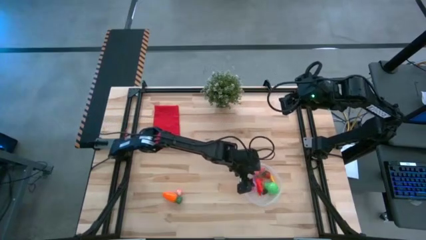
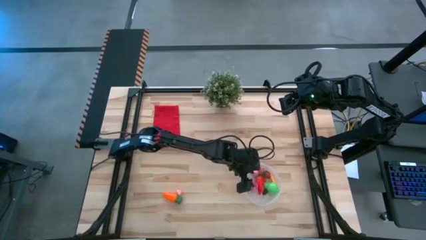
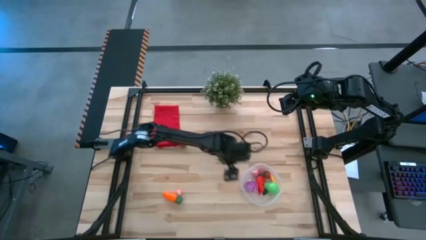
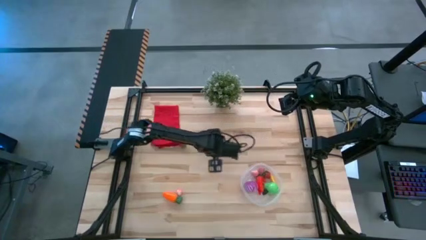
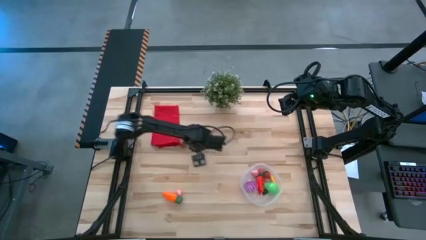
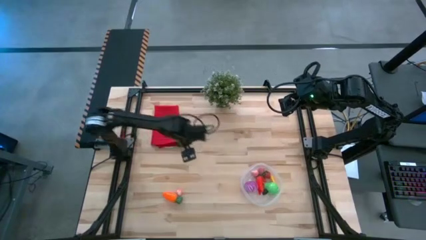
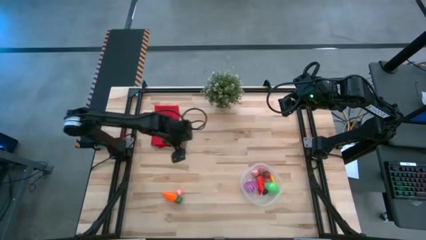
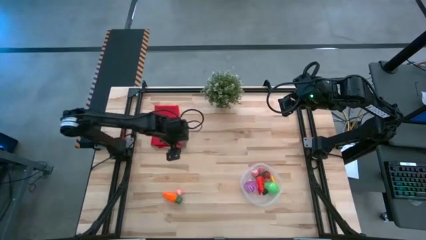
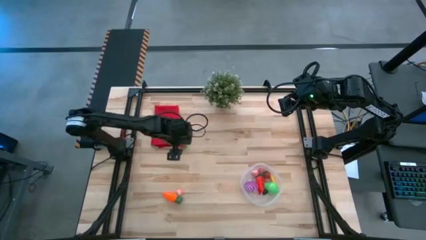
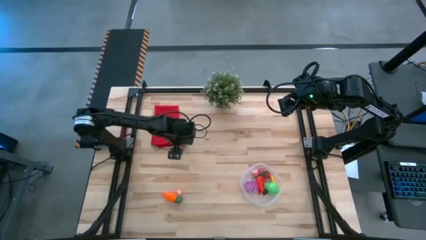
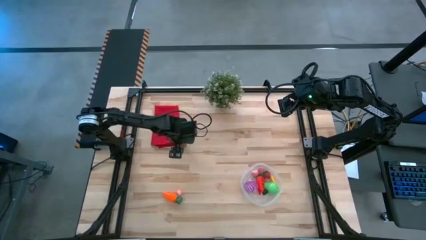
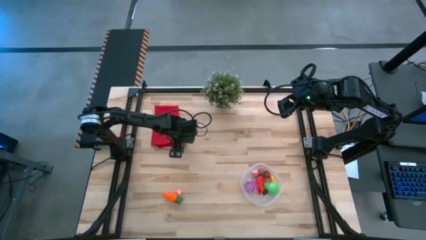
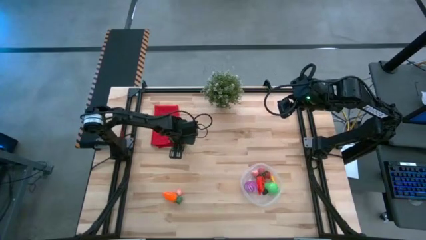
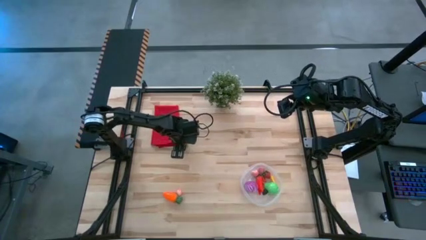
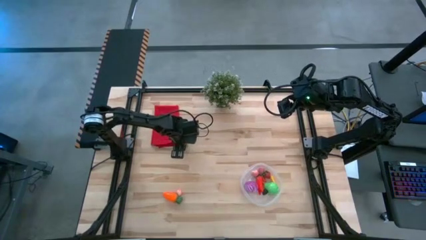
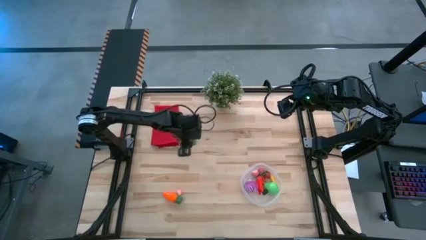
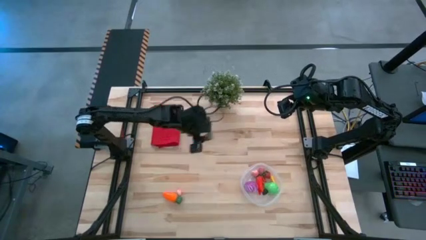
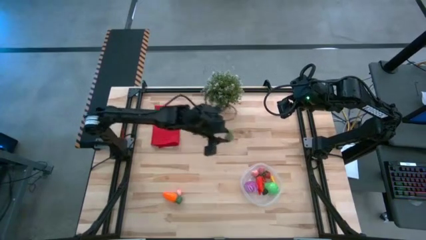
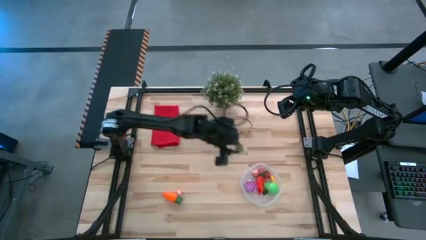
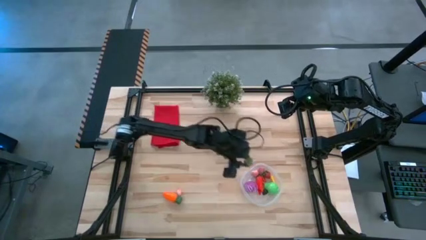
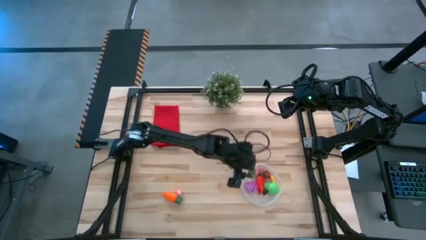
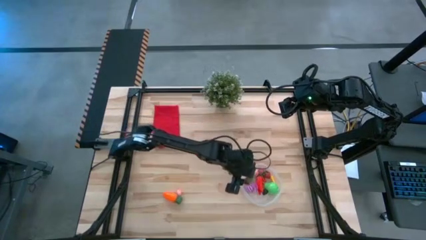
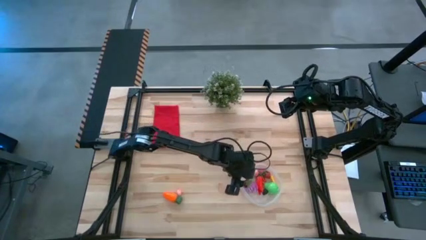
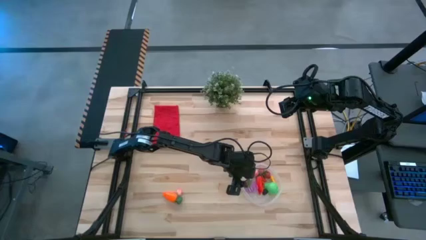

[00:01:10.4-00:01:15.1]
Task: Pick and placing Produce into tupperware
Put the red strawberry into the transparent bin

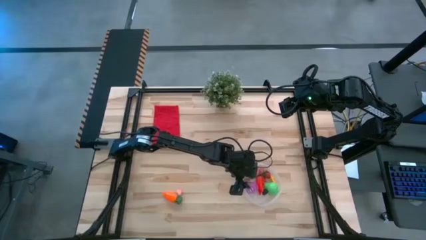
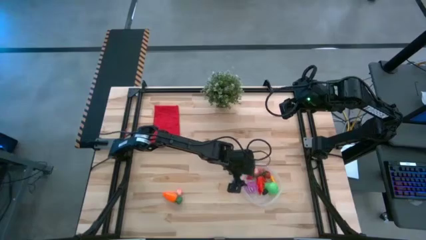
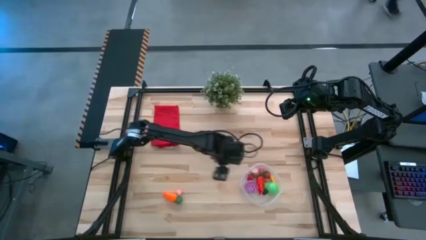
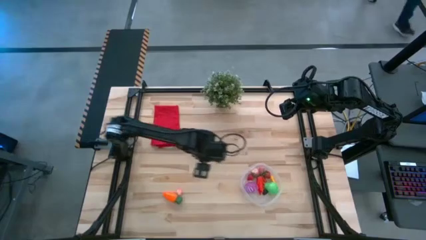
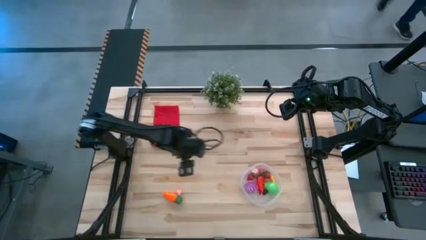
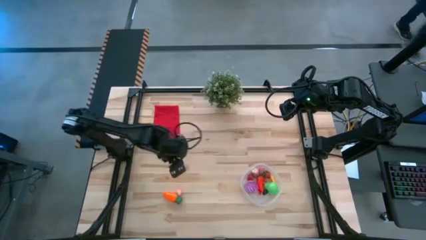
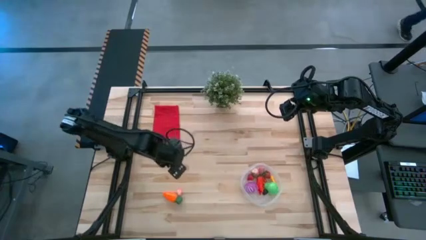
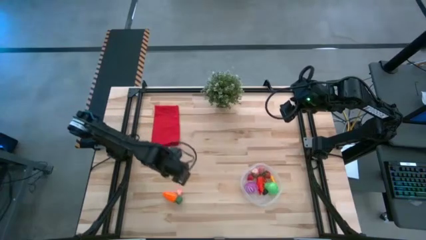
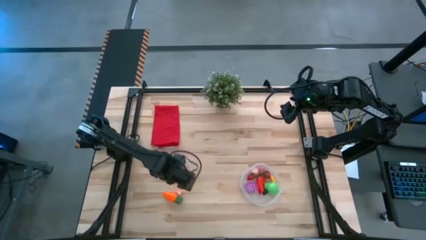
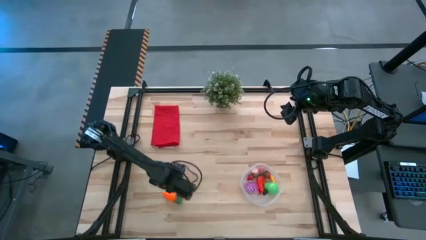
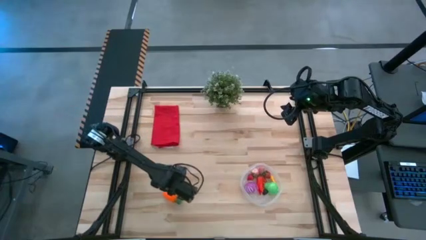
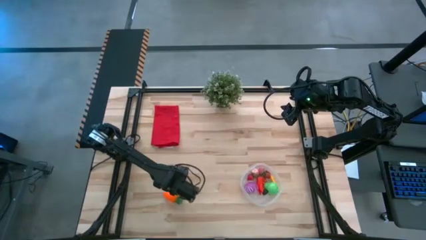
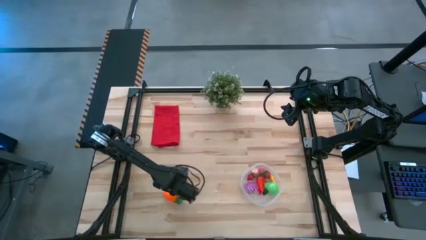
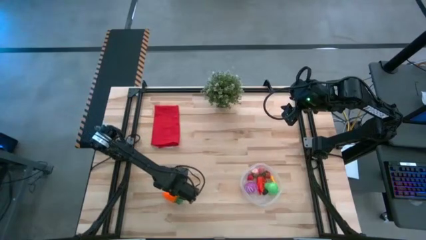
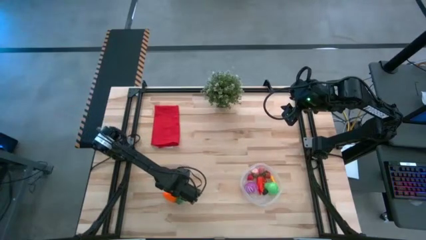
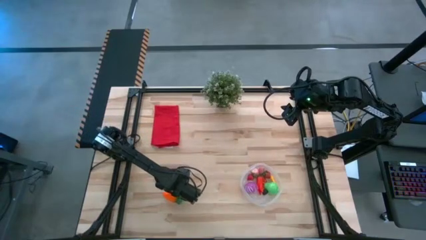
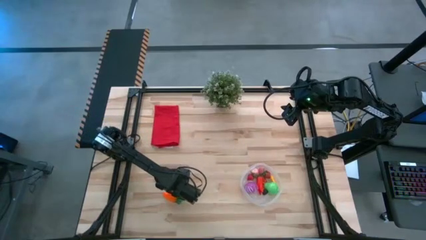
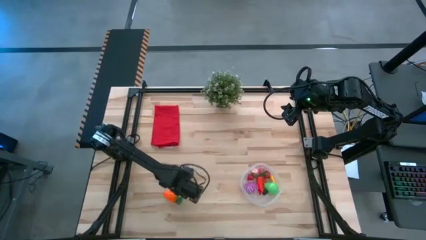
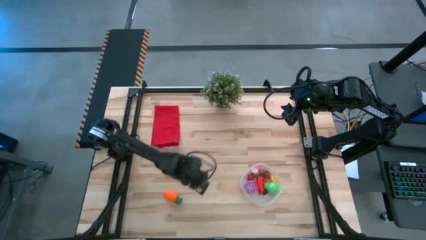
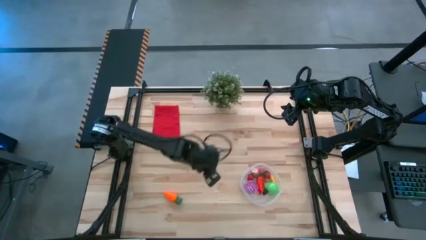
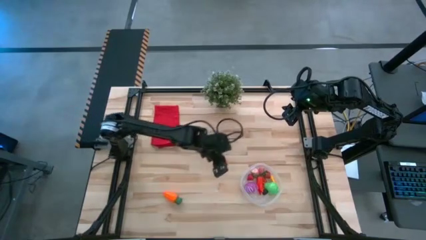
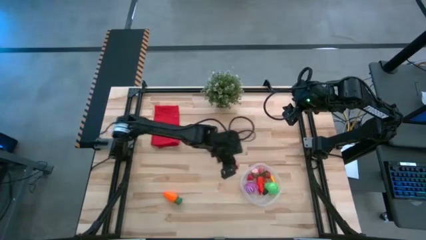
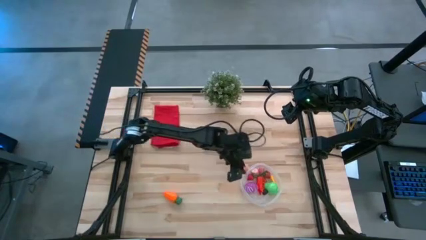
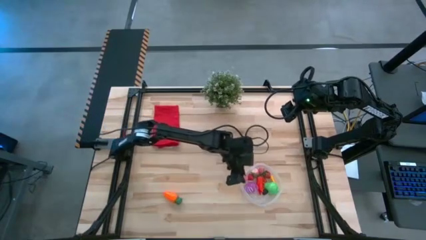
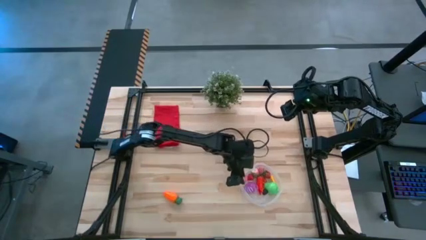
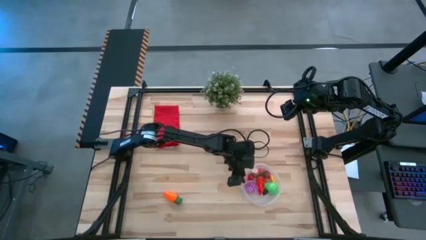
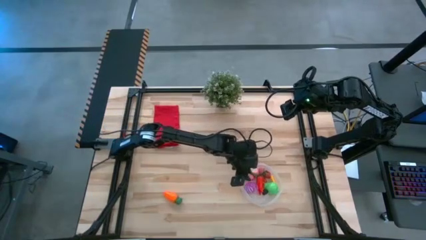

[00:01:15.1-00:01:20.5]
Put the pink peach into the transparent bin

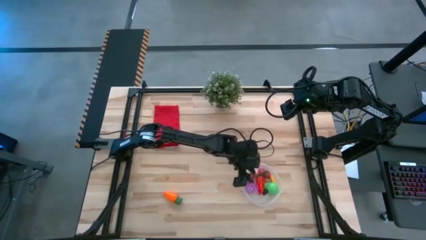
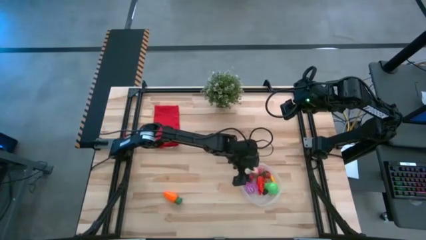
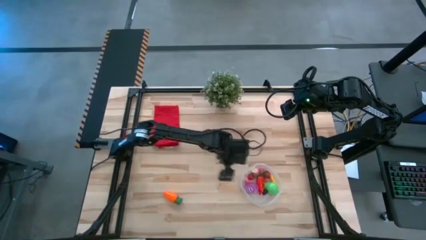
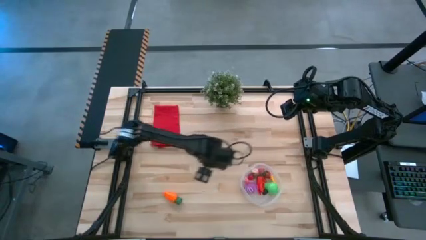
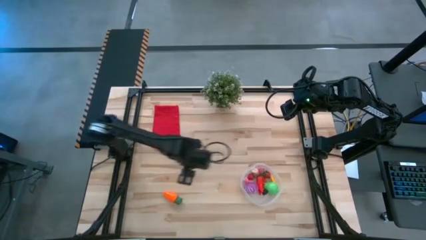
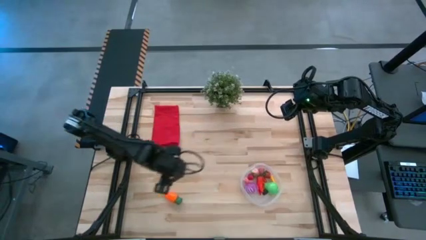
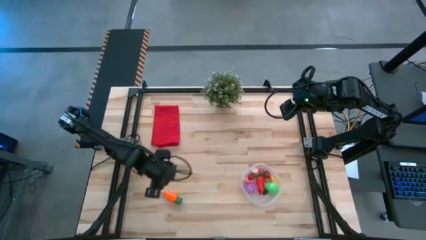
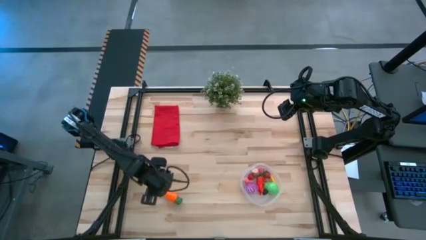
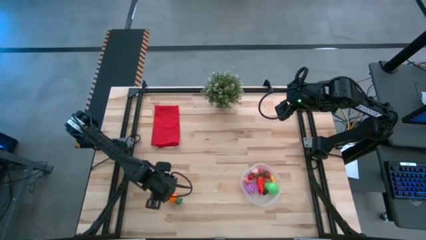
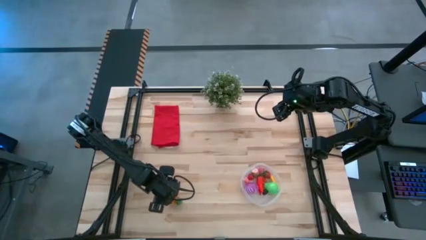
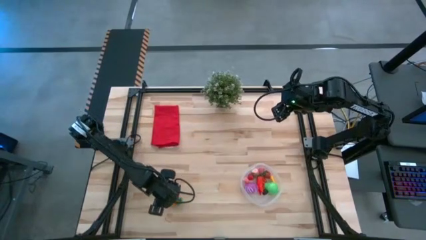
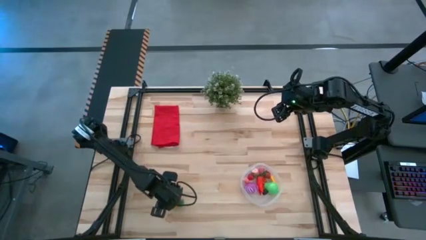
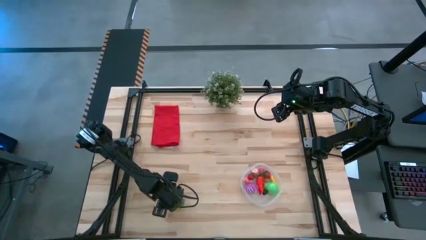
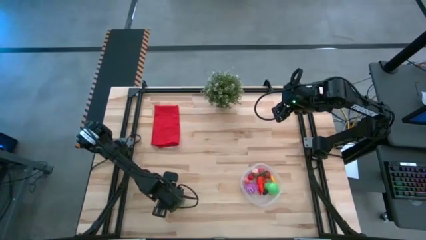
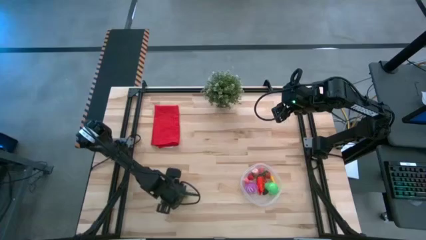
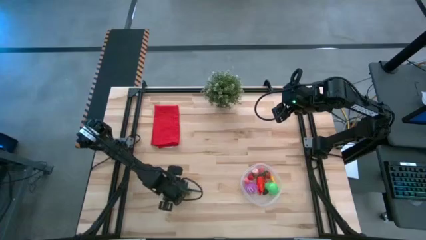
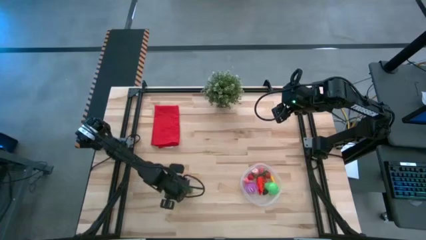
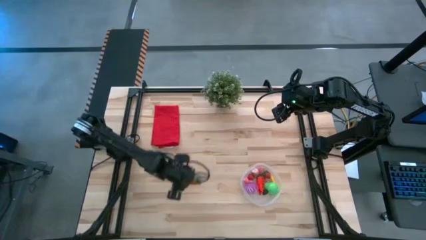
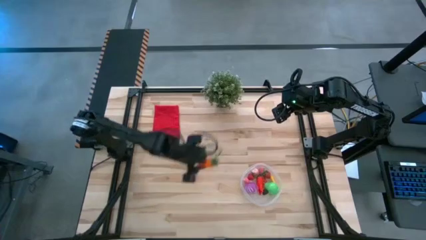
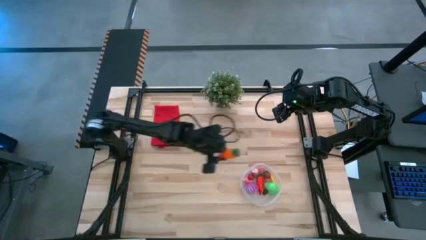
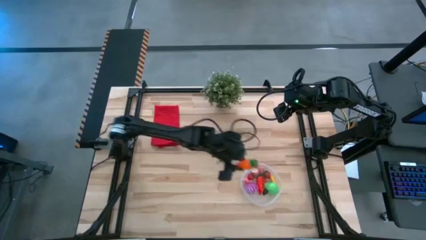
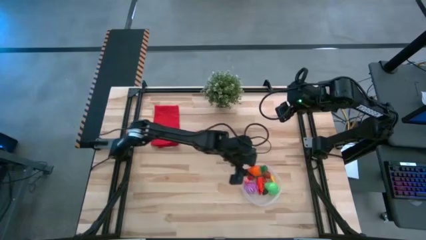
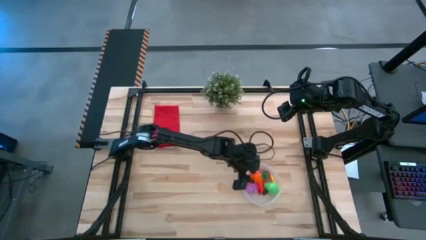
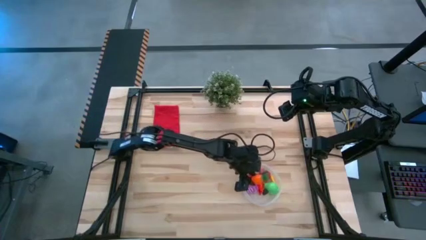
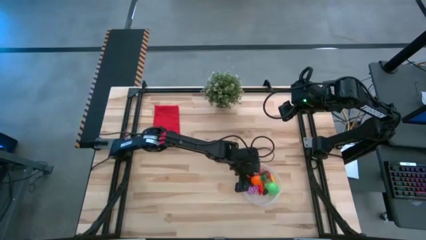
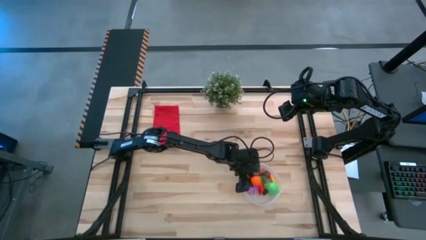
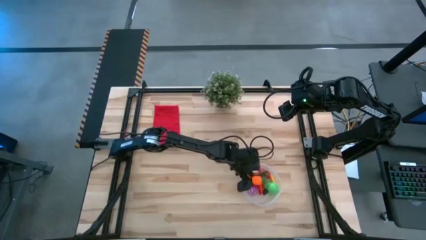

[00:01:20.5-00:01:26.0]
Put the orange carrot into the transparent bin
